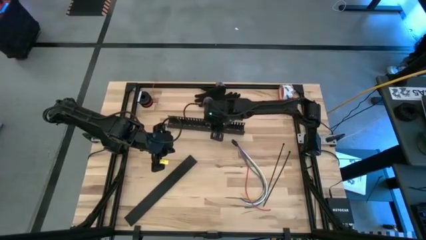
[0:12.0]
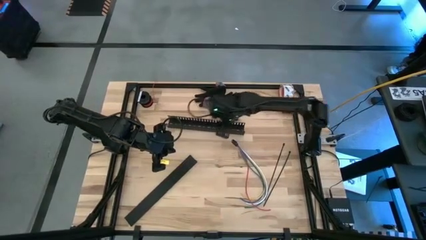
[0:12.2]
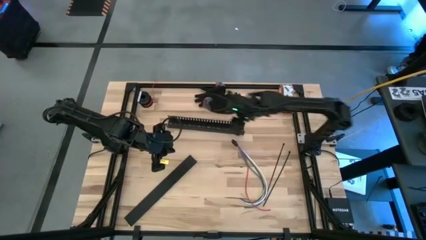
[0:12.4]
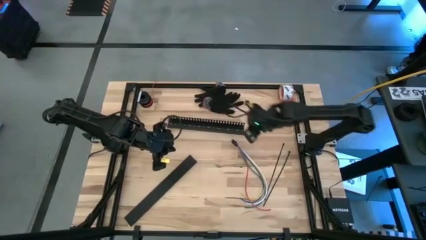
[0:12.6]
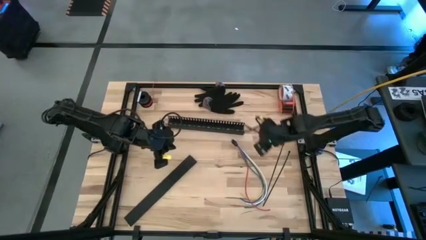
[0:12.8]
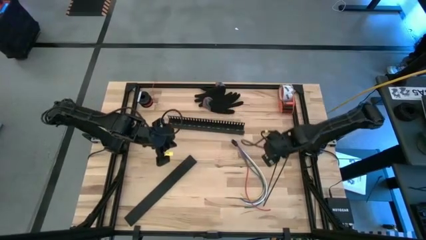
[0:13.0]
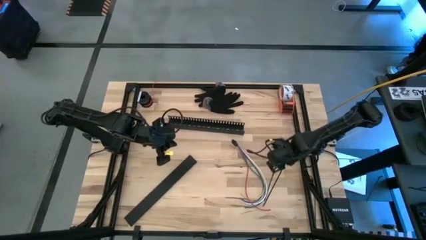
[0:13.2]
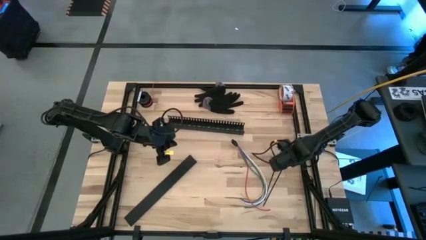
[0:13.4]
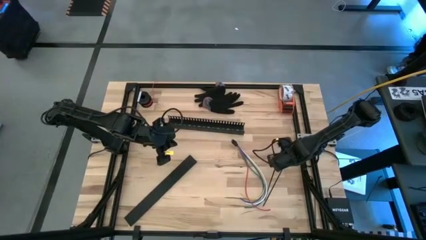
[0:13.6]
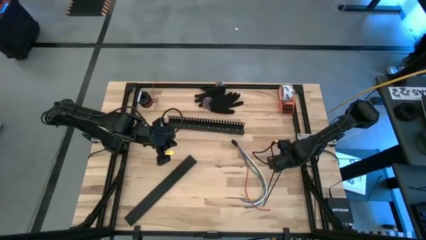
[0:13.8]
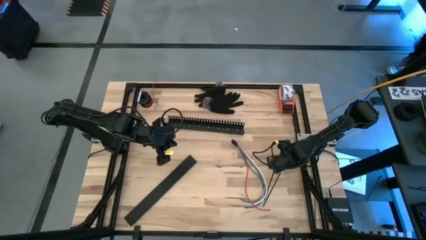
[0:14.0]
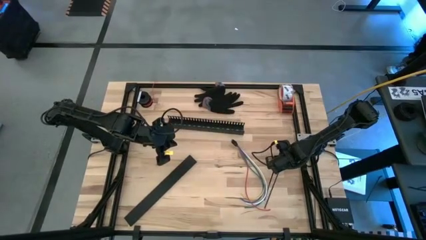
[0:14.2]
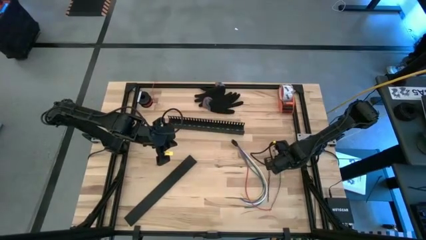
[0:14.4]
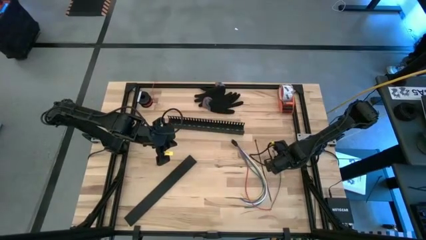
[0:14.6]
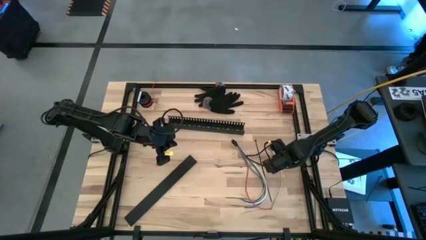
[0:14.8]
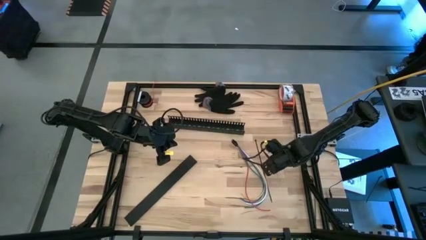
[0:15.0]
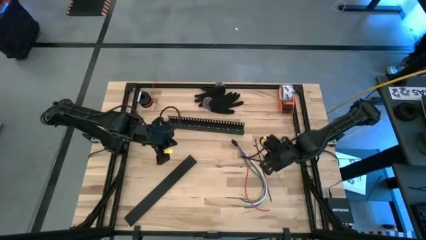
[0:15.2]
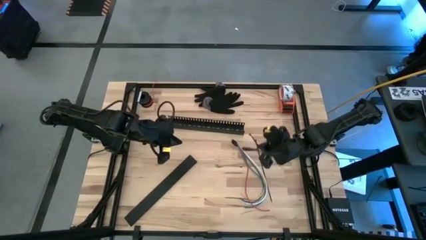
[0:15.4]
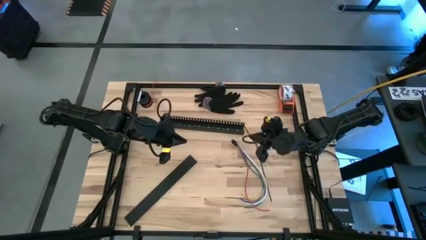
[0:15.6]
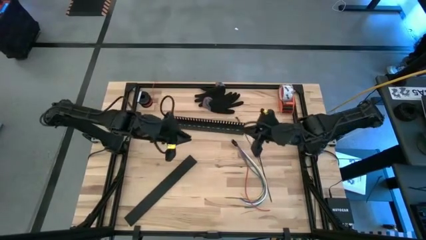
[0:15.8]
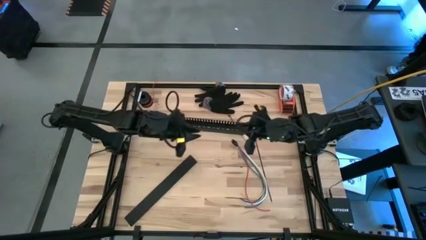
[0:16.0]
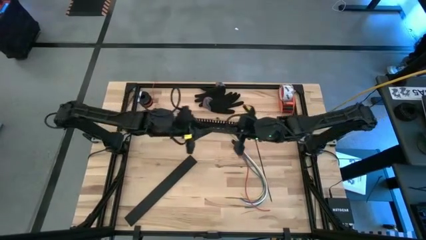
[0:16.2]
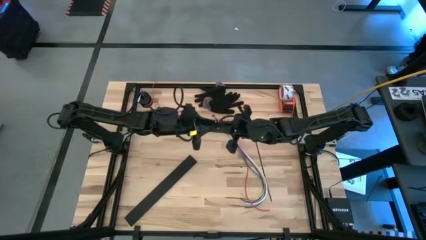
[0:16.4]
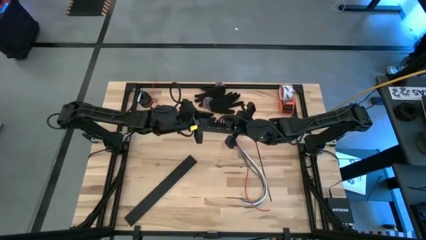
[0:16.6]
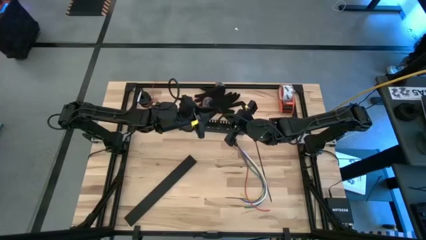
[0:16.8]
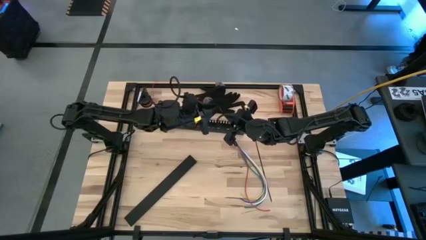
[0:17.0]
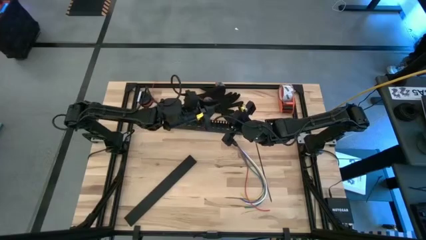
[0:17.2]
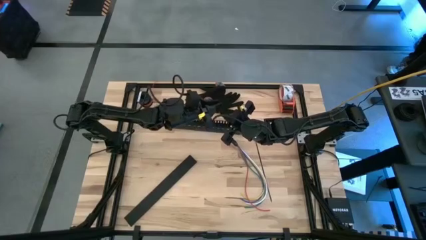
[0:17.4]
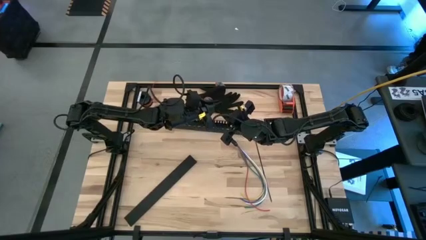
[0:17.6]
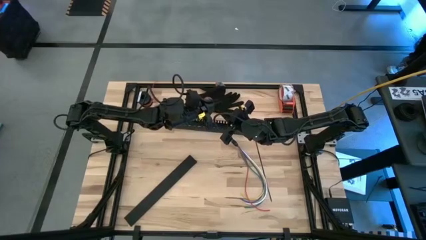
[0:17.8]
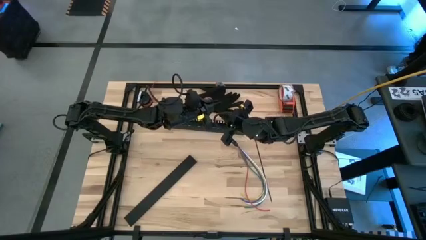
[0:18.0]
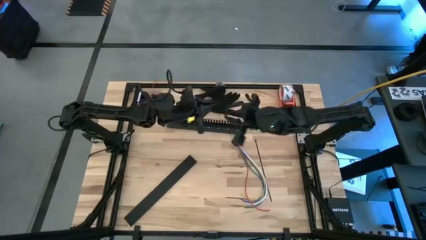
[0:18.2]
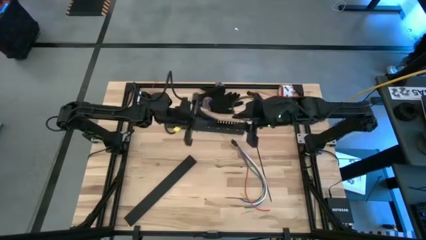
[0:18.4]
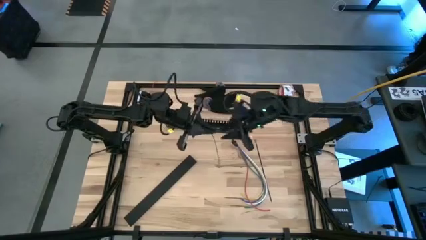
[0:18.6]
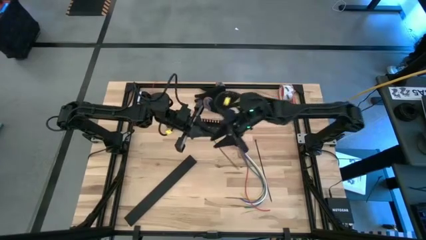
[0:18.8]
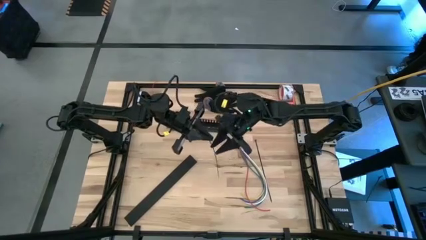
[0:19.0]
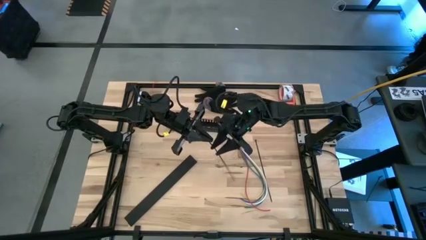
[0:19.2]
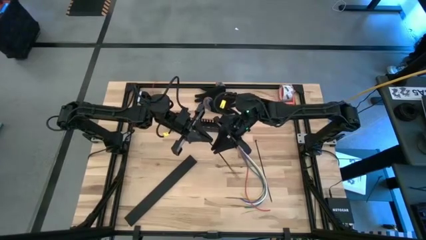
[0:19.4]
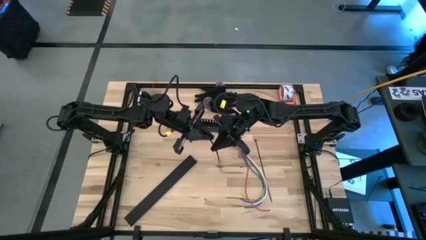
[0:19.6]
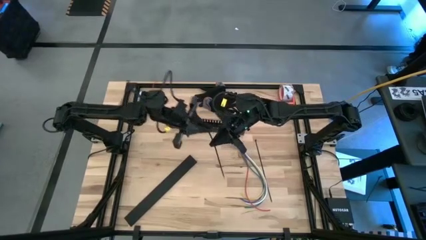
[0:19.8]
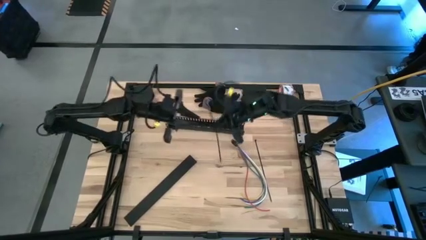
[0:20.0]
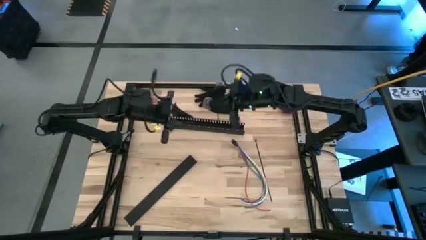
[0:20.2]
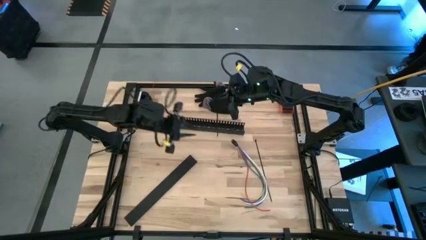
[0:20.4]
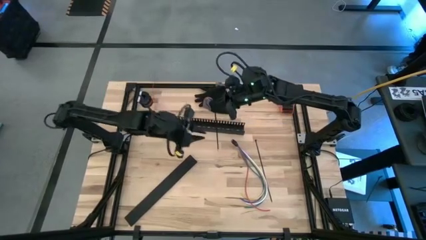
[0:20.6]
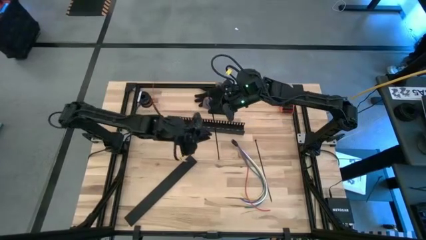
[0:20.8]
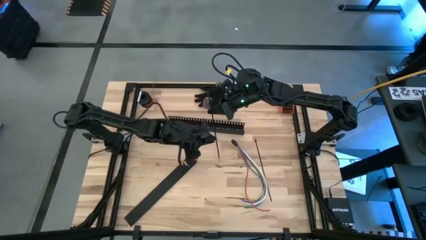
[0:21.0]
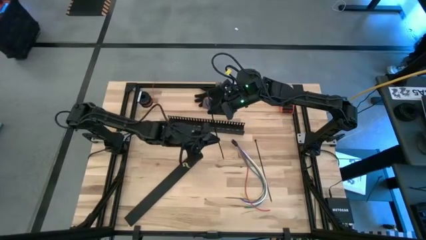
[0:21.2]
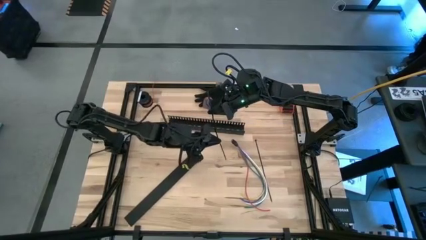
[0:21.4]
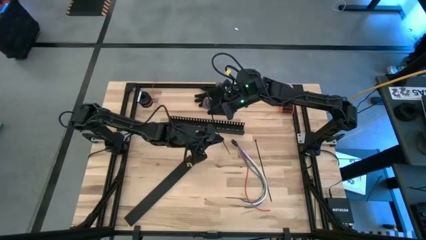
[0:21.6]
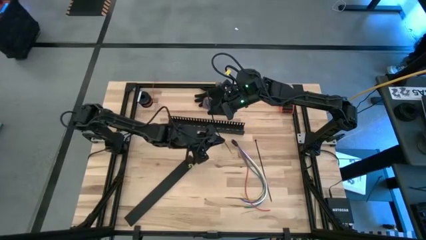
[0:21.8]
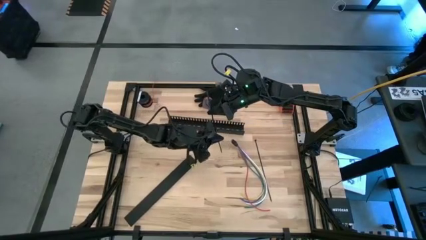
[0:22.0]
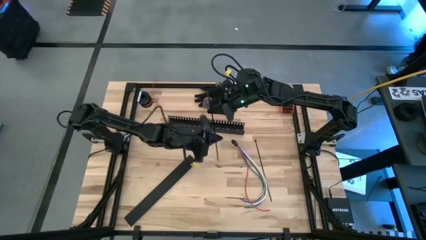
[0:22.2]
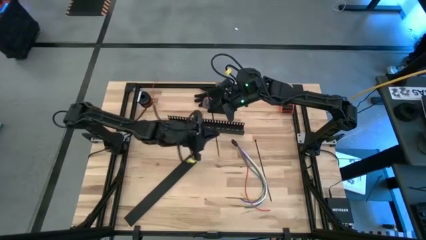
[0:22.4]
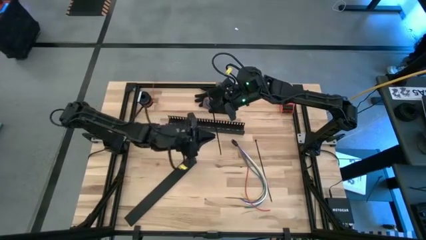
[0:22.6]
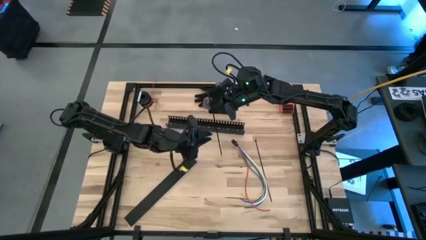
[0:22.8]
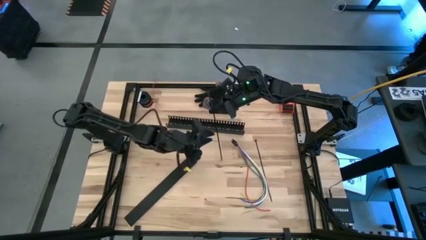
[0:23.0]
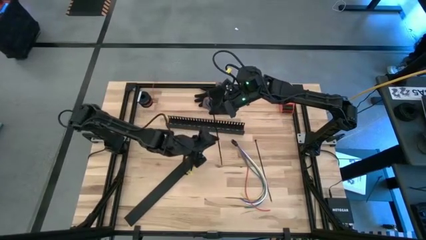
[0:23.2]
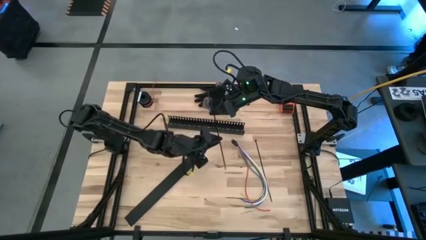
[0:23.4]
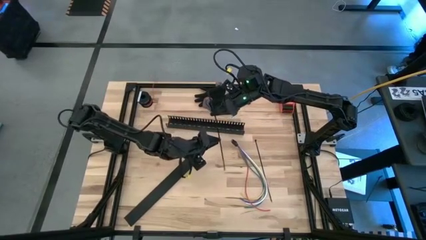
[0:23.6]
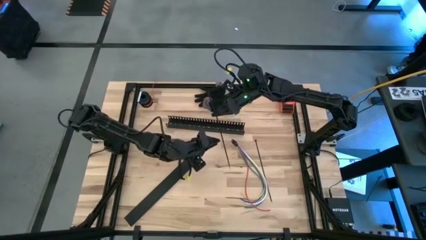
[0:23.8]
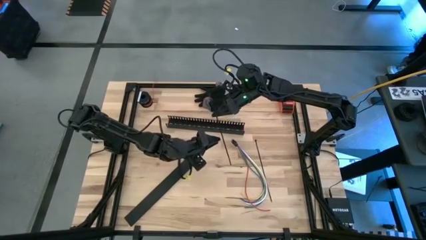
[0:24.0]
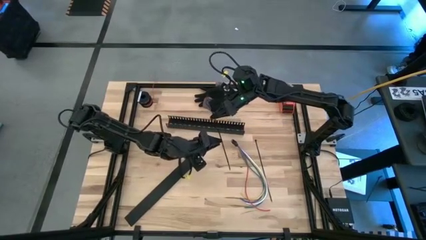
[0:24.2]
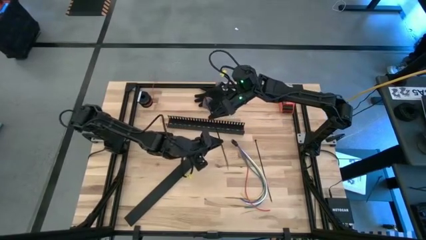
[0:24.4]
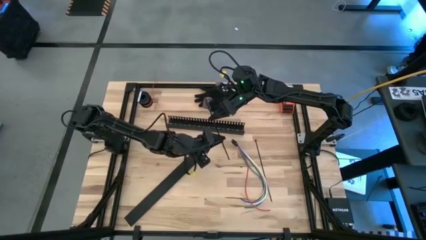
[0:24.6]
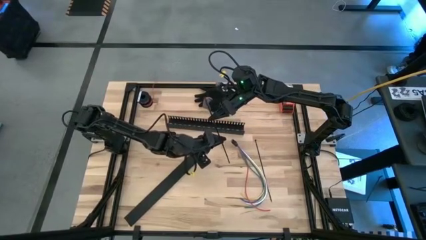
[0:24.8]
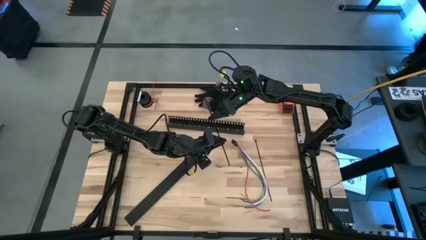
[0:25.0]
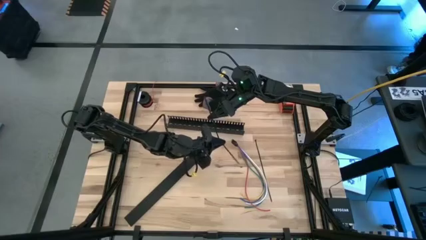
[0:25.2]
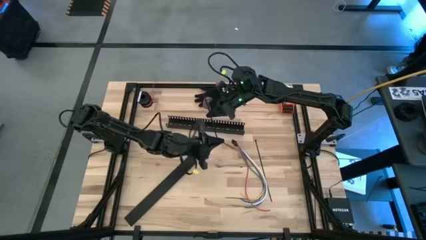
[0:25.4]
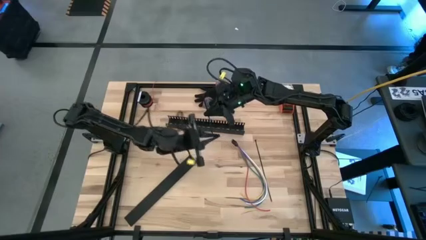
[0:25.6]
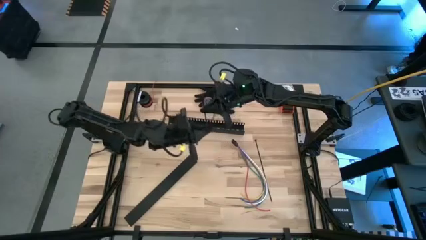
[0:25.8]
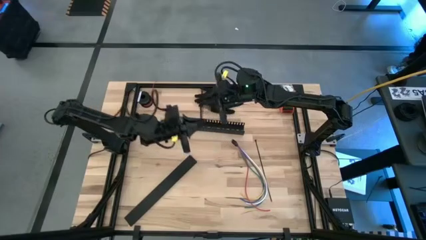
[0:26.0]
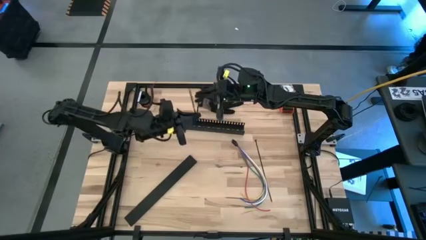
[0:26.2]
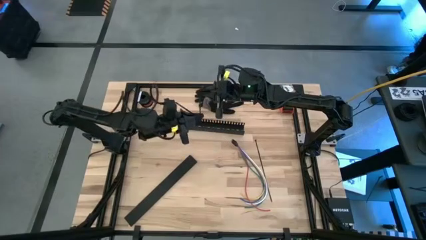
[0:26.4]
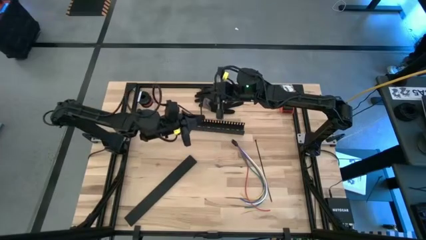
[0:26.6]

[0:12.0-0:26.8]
Task: Ziptie cables
Prepare the black zip tie
